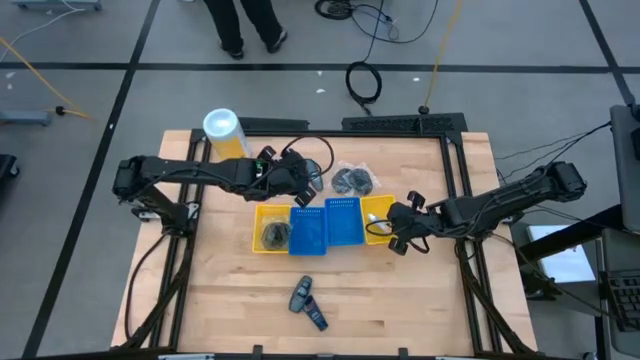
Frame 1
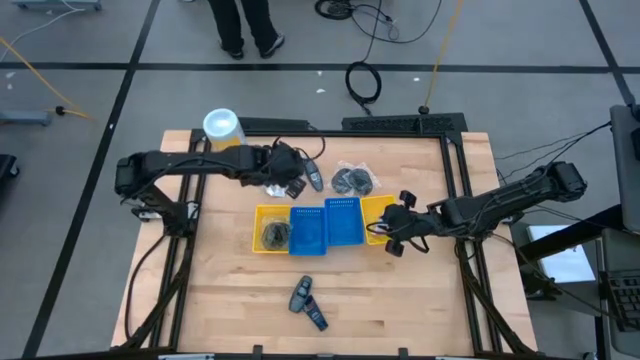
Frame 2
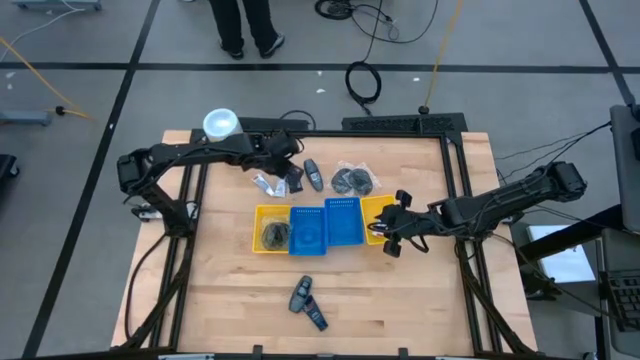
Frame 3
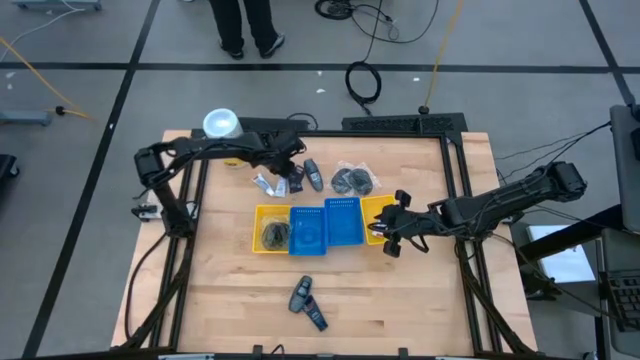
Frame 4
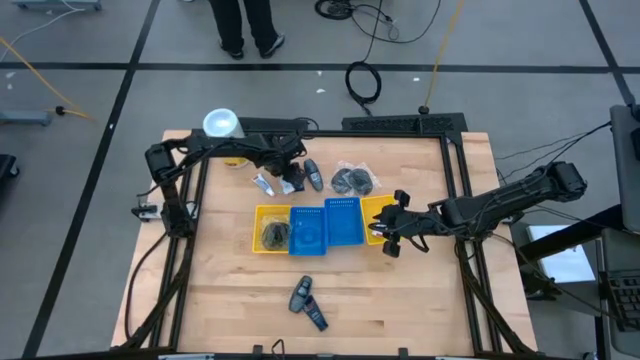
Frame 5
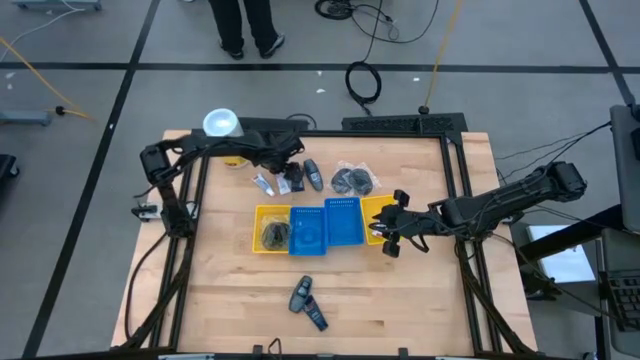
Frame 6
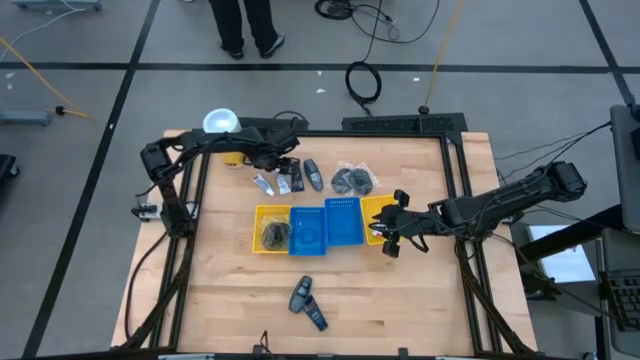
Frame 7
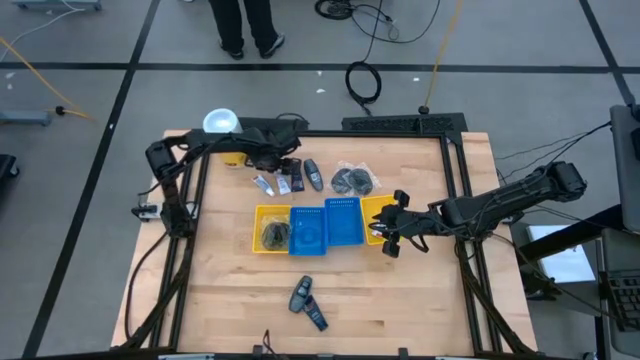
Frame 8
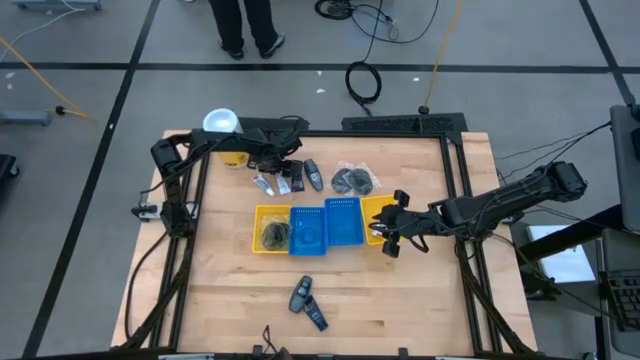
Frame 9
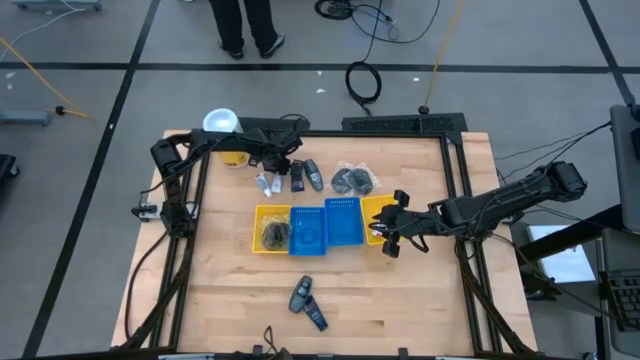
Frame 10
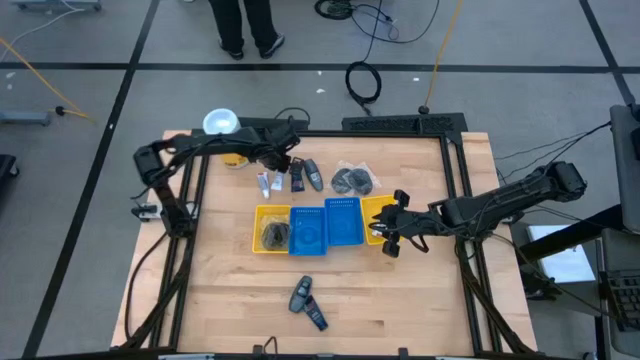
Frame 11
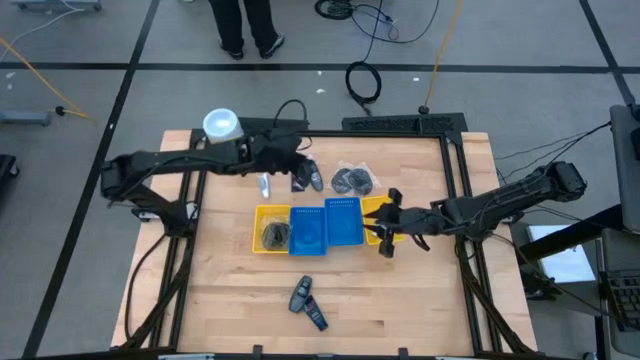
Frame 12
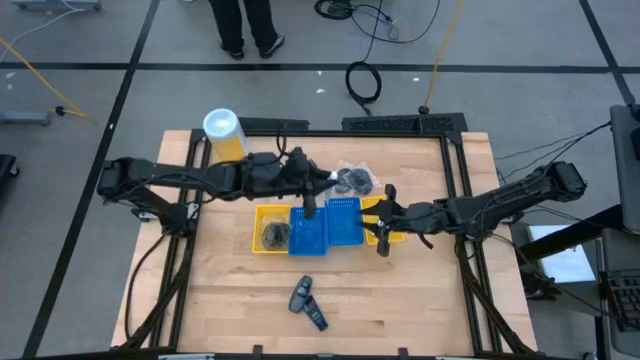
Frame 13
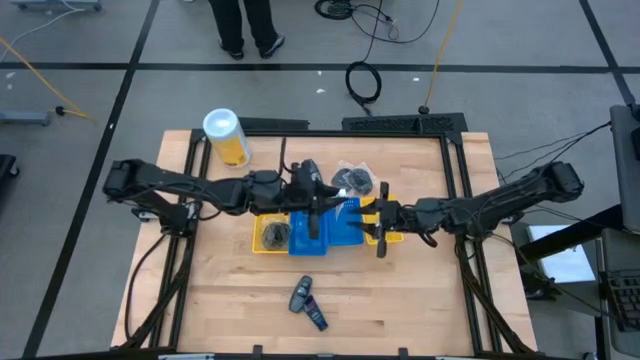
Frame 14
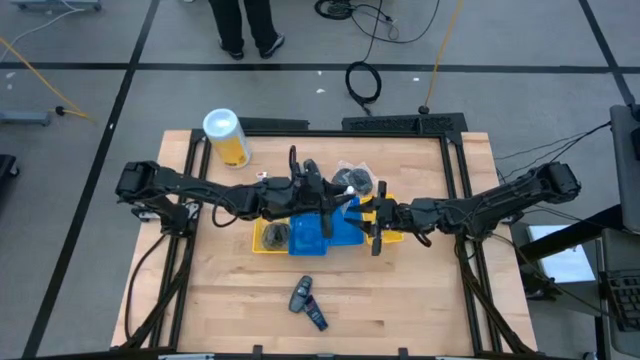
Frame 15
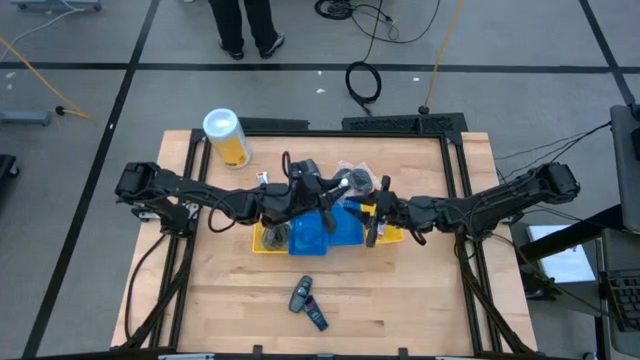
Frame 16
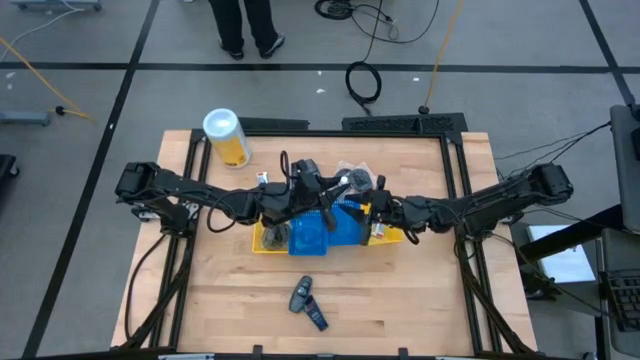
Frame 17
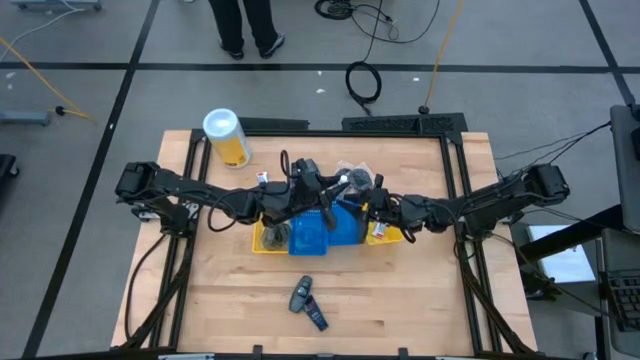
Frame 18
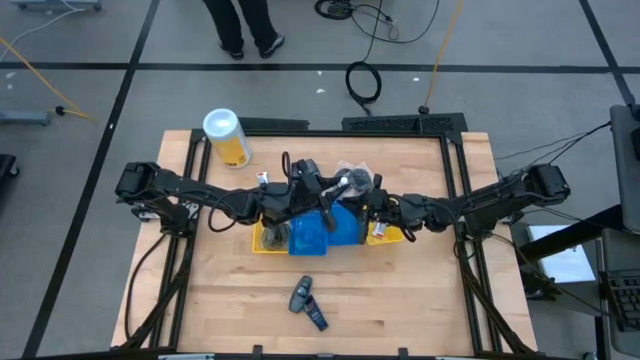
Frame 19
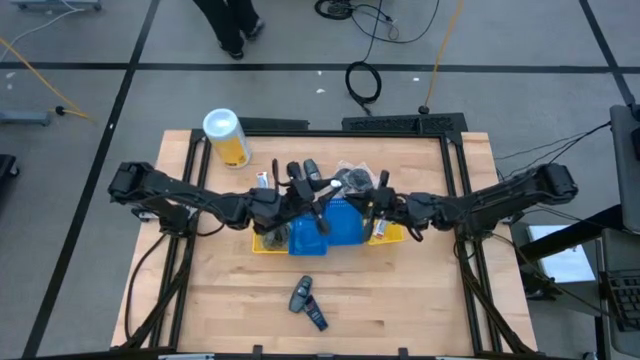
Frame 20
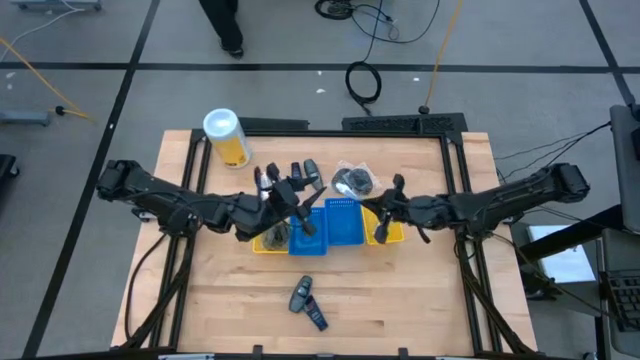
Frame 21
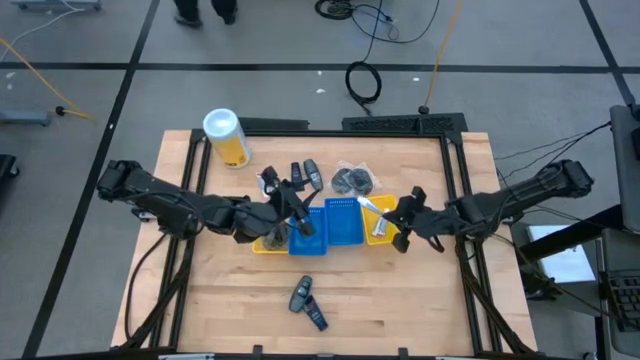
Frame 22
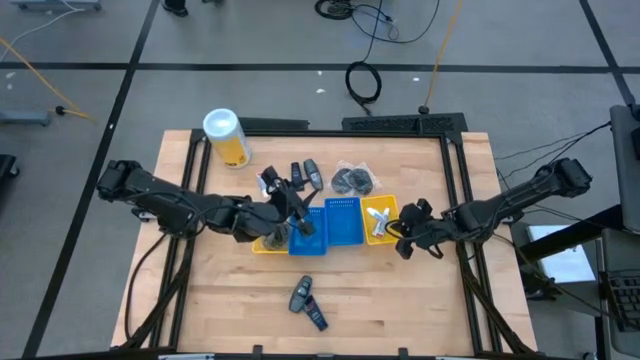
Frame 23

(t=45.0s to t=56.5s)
Task: Pick & Place Travel size toiletries
Put the toothpaste into the right yellow bin

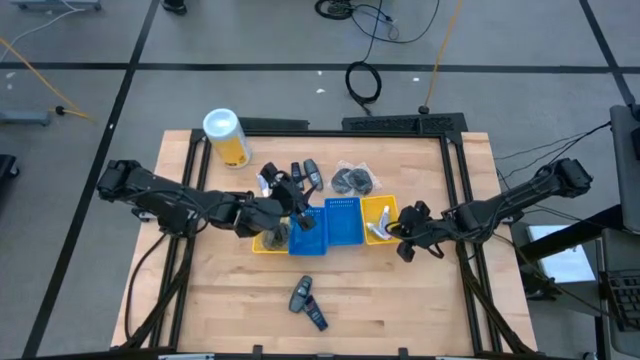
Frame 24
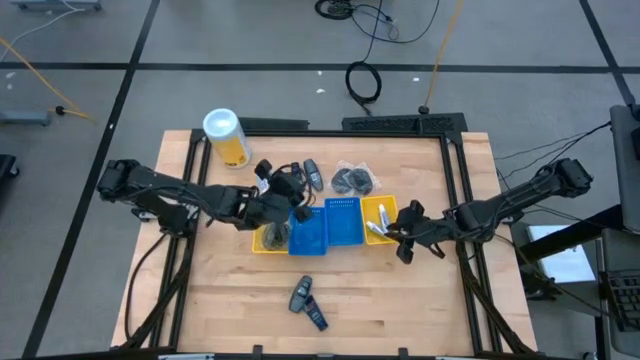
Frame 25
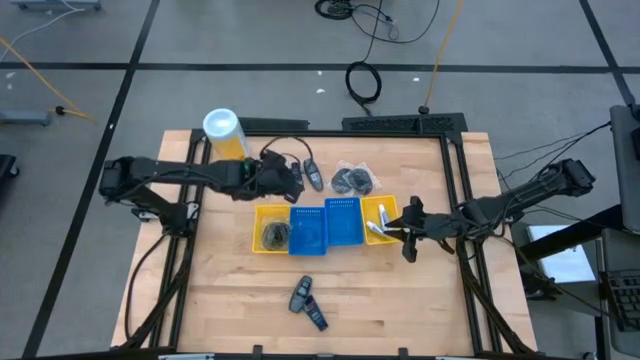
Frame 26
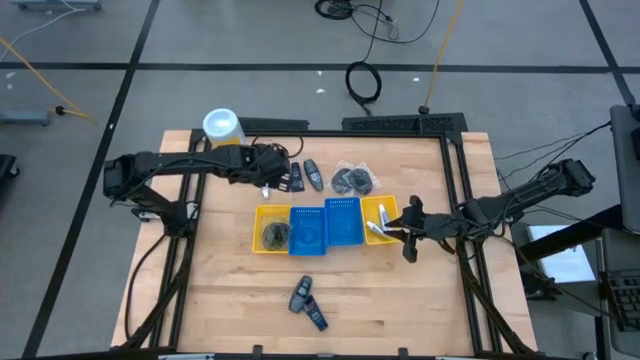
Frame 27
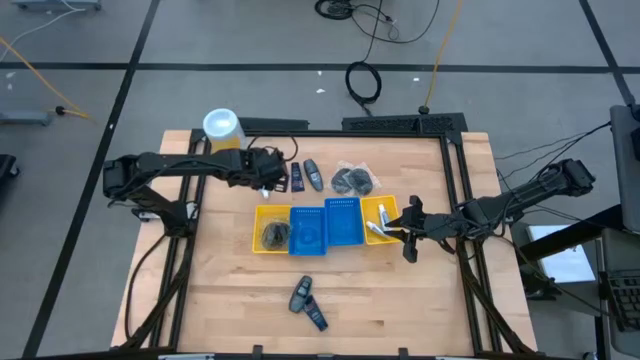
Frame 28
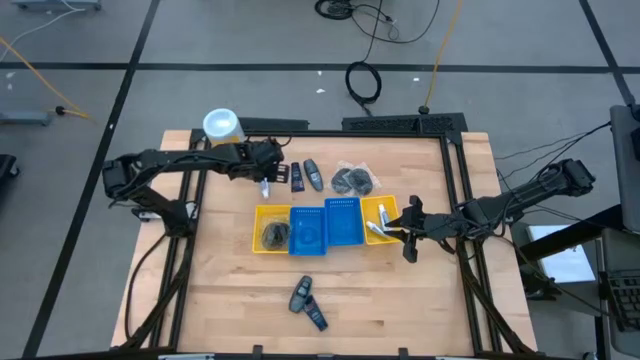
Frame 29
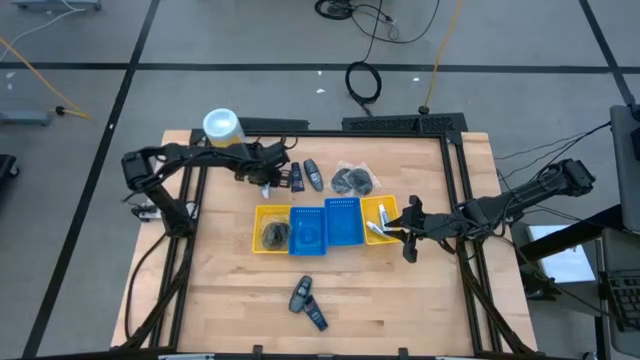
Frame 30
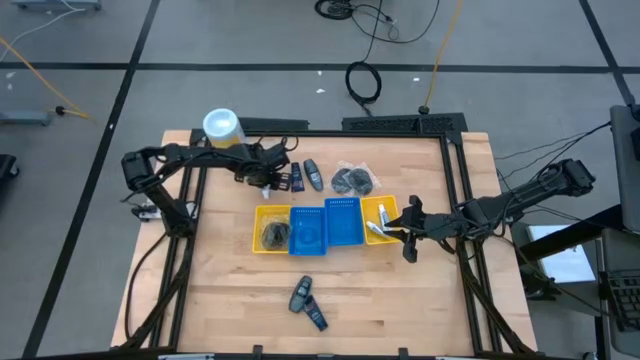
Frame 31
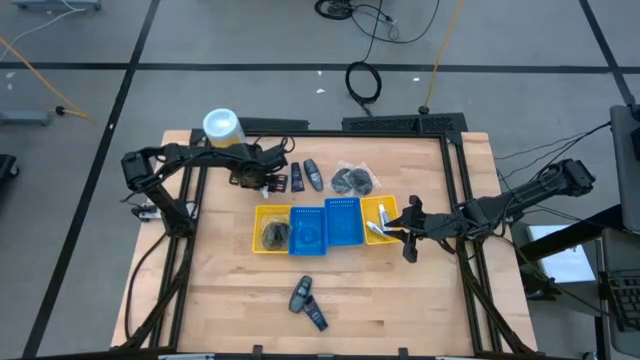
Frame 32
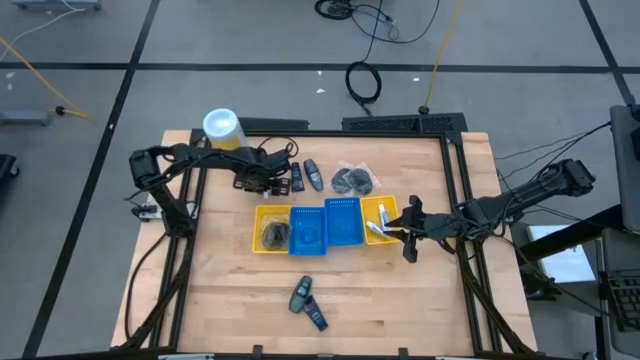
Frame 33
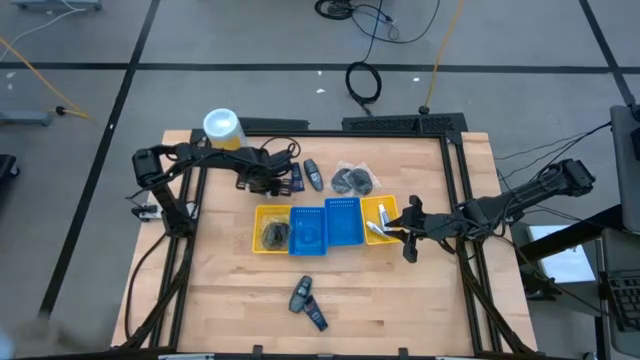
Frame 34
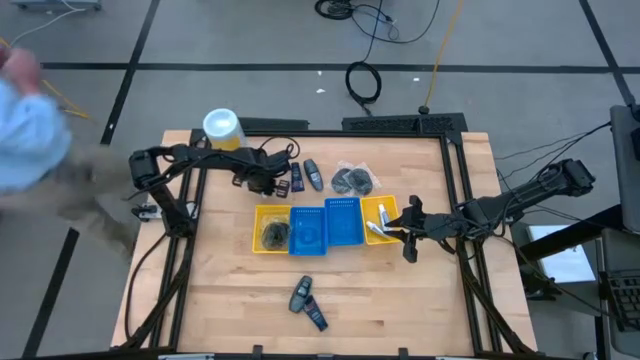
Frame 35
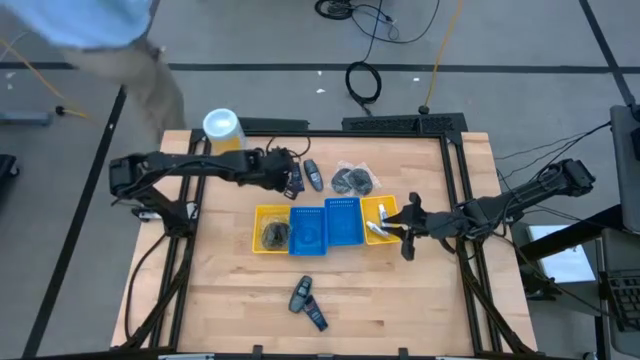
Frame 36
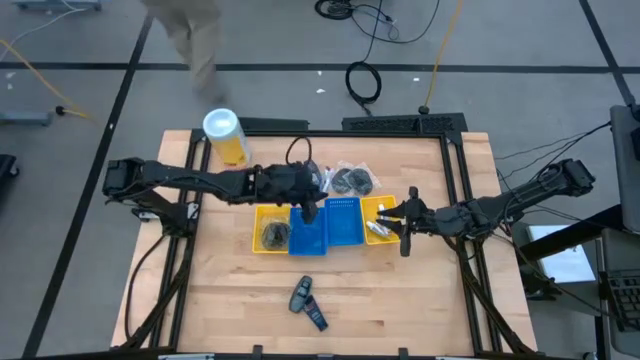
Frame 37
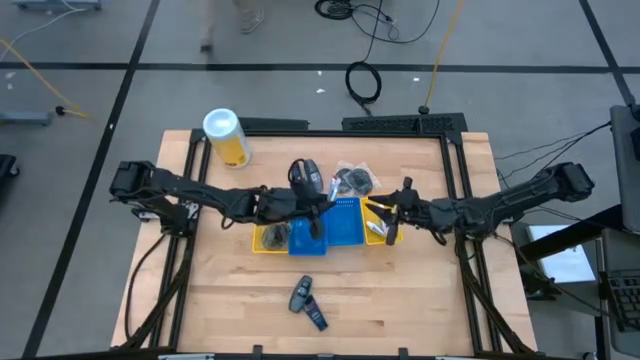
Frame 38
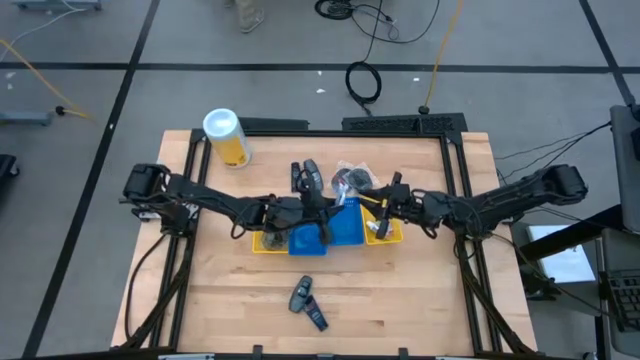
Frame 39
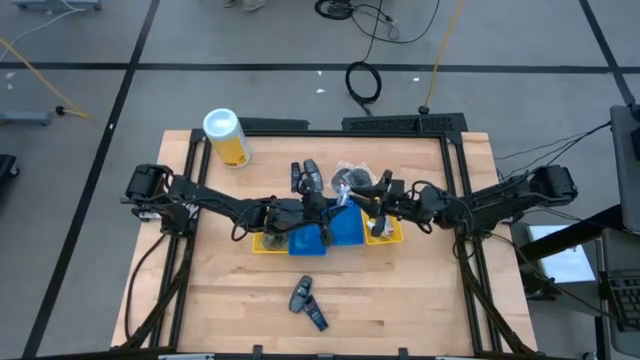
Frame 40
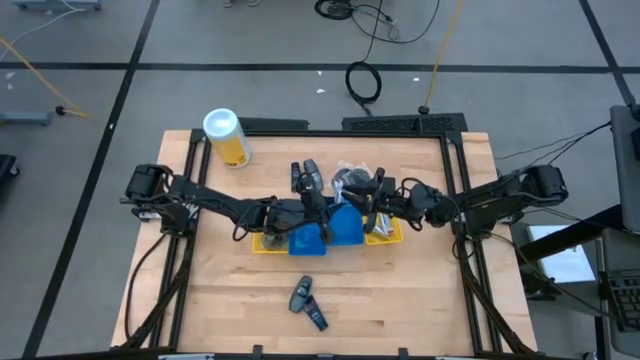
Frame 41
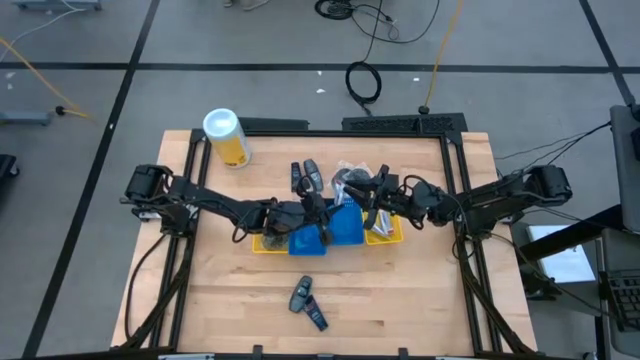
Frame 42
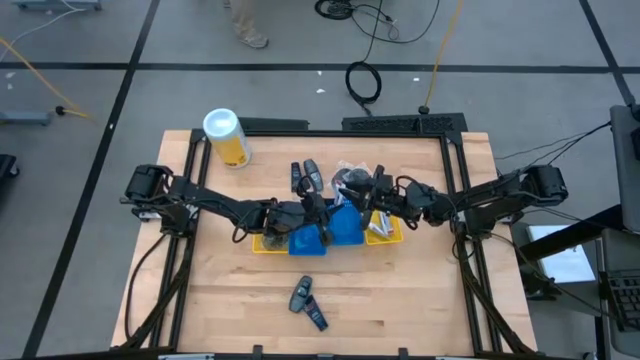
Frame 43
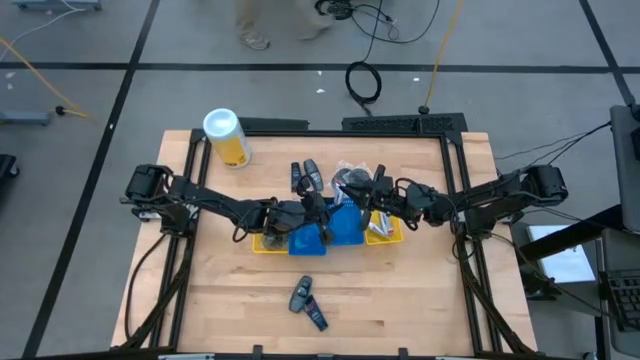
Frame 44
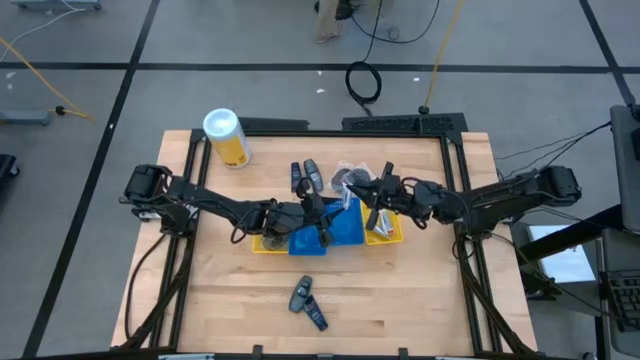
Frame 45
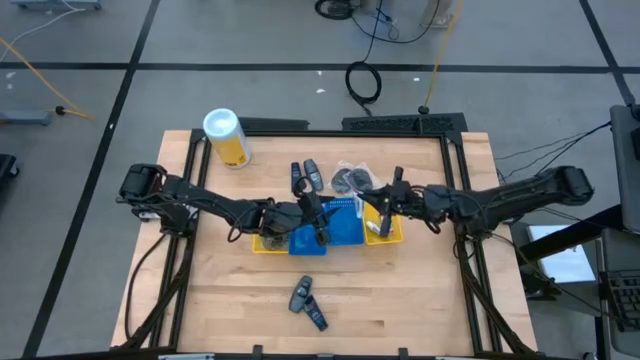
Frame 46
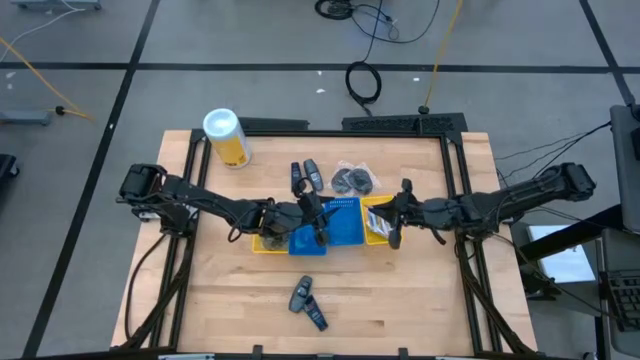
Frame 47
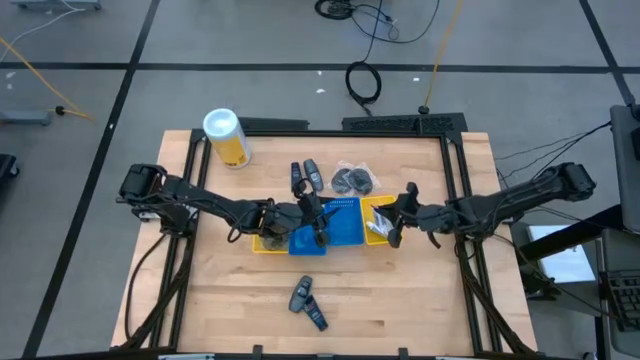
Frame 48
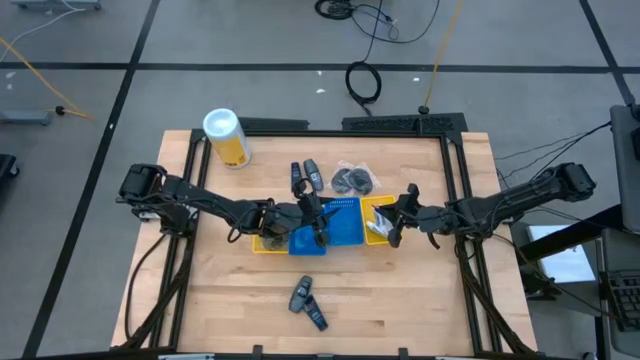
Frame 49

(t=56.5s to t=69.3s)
Put the toothpaste into the right yellow bin
